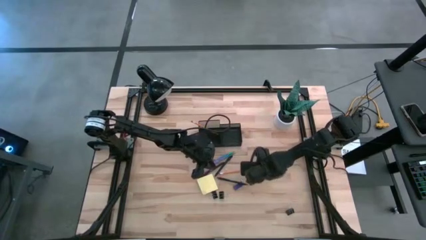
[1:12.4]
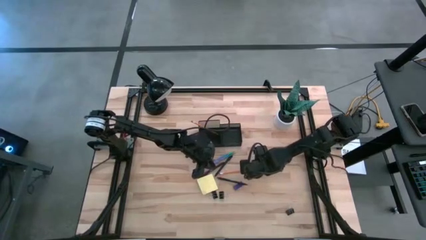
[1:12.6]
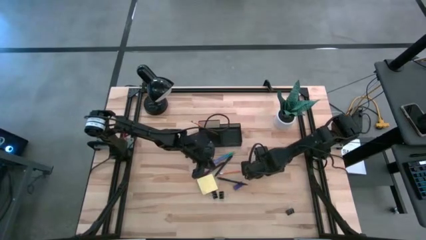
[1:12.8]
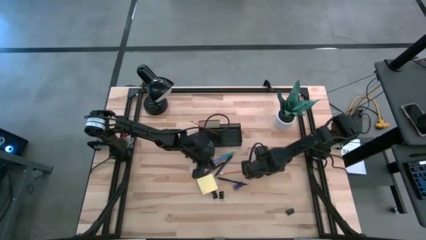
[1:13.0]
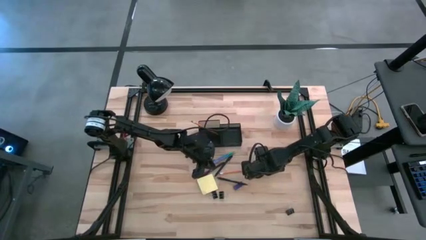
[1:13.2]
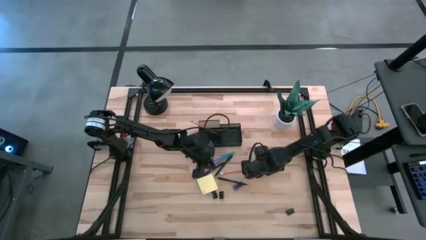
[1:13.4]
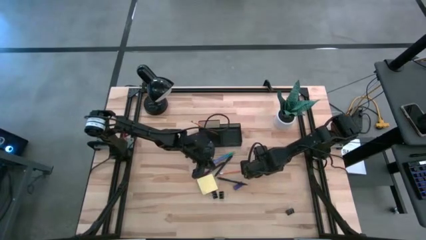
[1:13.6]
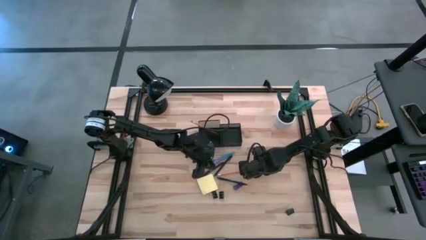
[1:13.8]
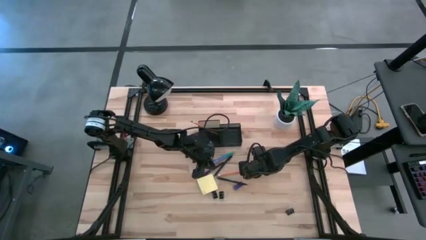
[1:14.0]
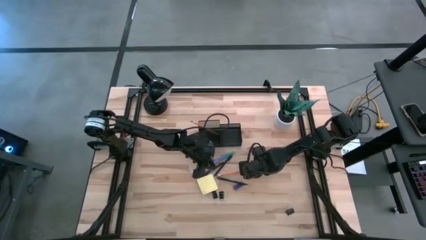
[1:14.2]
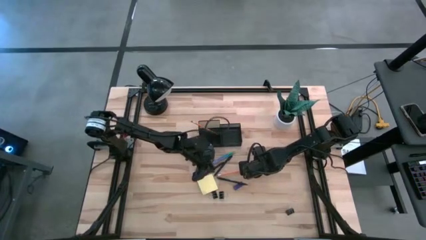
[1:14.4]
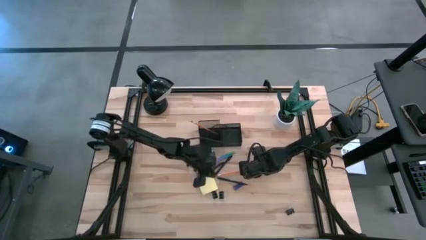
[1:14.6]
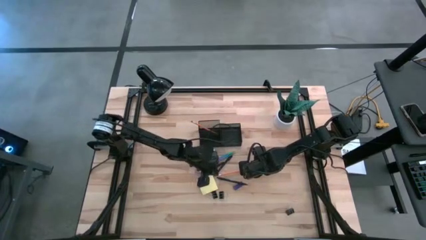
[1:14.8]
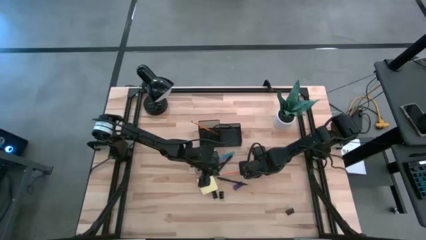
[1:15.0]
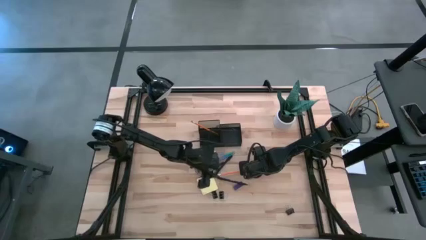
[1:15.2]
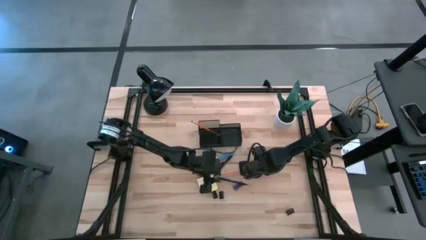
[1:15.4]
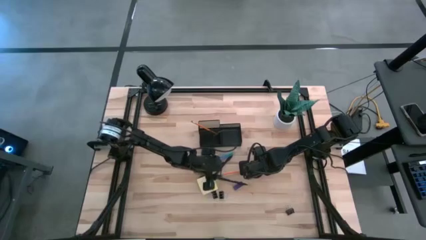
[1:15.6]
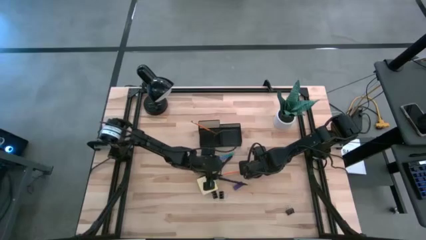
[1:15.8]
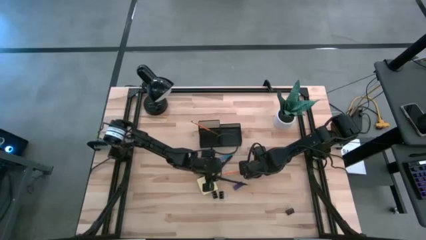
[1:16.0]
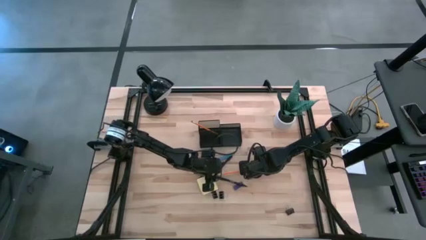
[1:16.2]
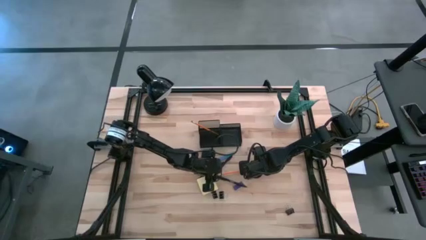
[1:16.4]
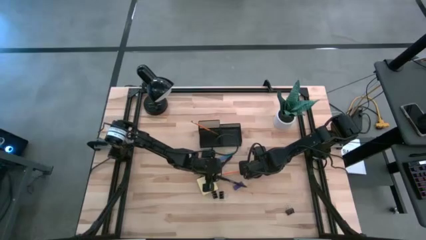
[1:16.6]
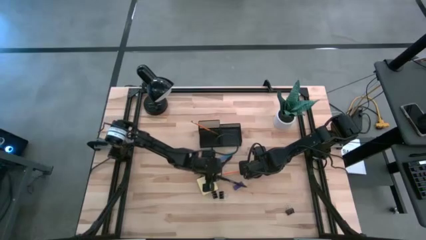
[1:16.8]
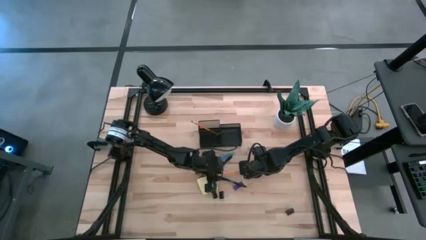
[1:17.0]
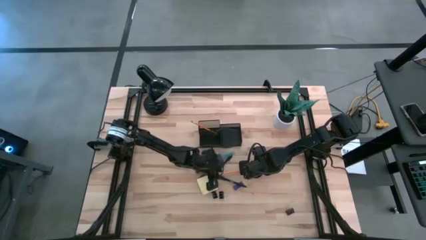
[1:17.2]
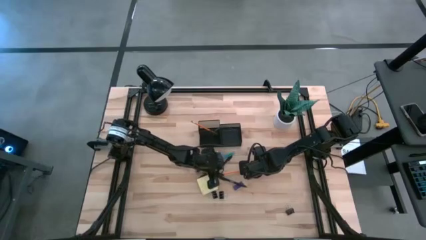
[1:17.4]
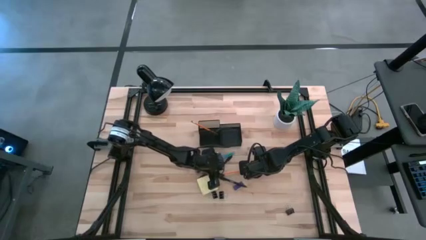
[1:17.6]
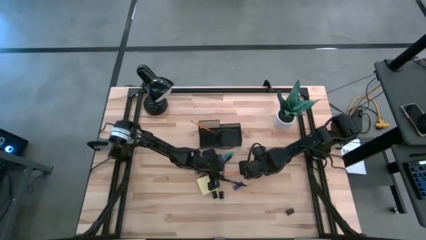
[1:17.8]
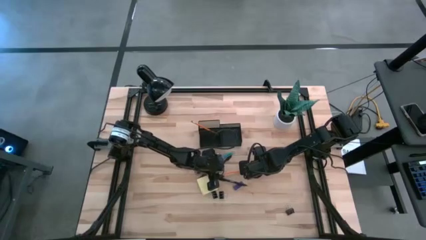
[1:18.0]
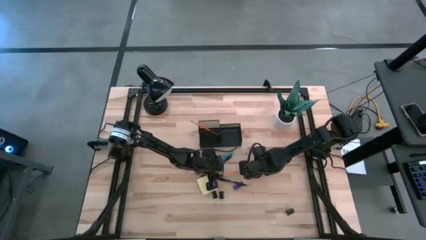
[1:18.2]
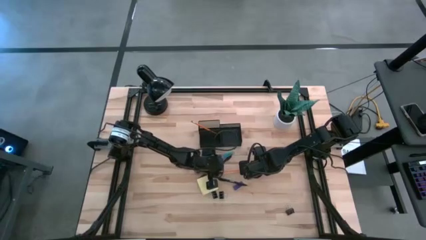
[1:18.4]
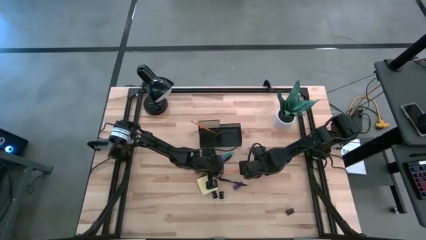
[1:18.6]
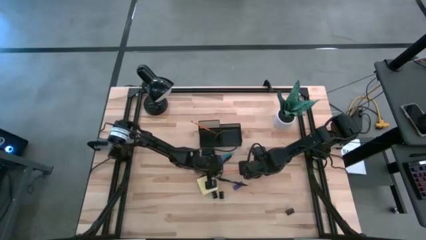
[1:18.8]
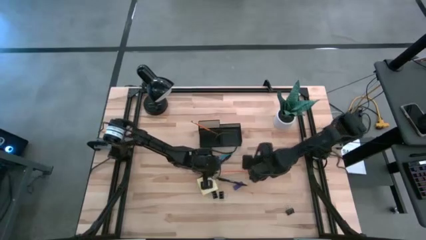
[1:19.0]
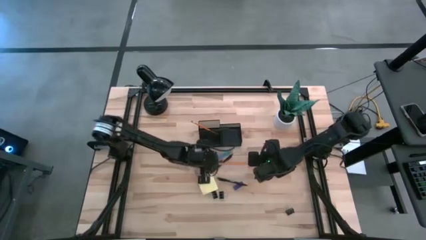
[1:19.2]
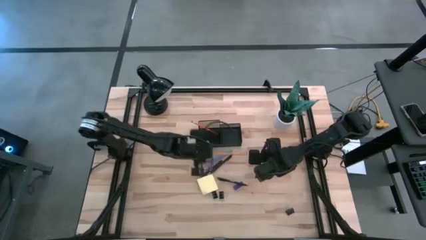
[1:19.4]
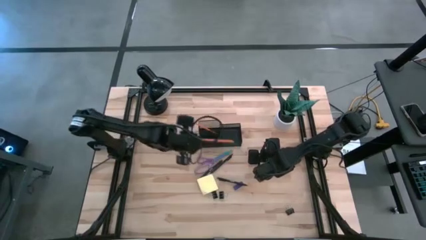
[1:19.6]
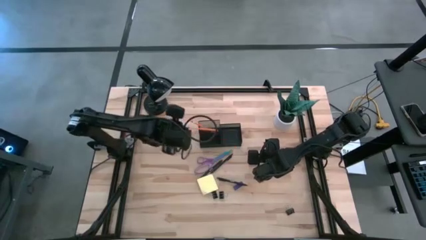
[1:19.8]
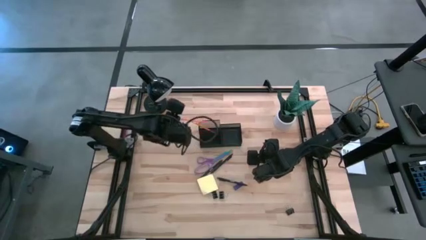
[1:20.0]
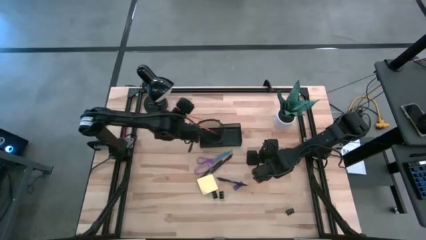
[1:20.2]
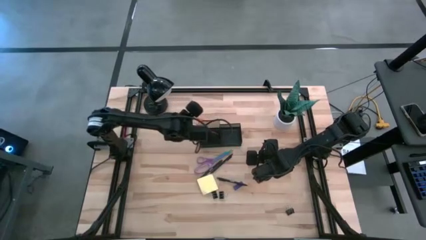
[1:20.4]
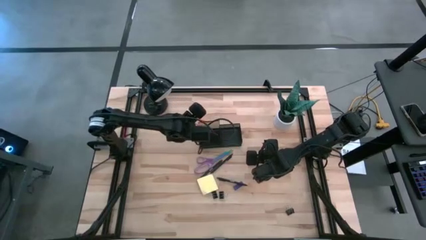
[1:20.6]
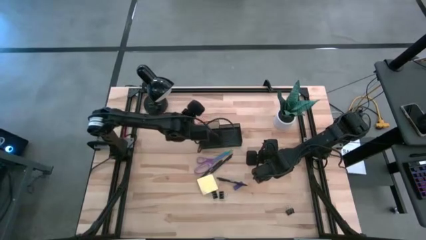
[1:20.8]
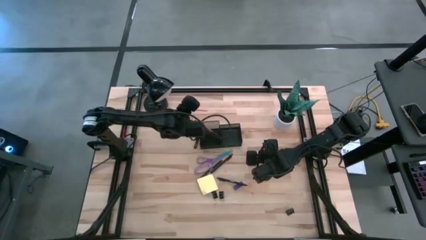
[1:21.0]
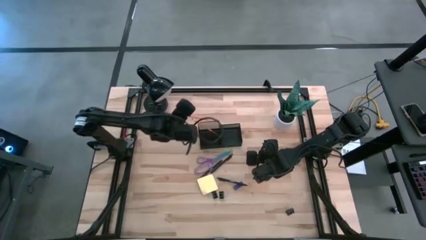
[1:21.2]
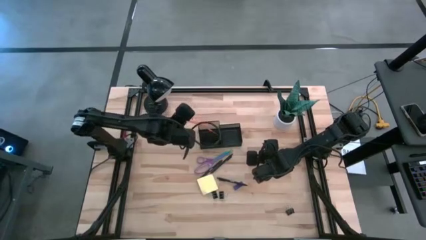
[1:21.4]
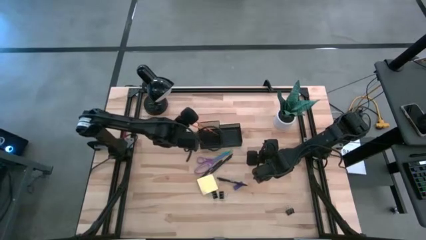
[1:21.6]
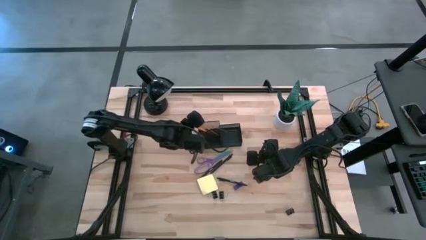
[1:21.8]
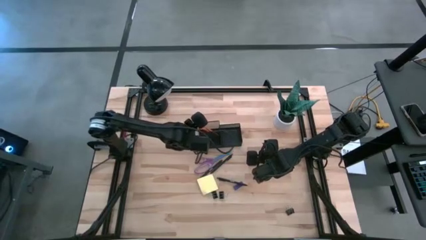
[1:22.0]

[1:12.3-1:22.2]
Task: Pick and place office supplies into organizer
Put the orange pencil into the black desk organizer

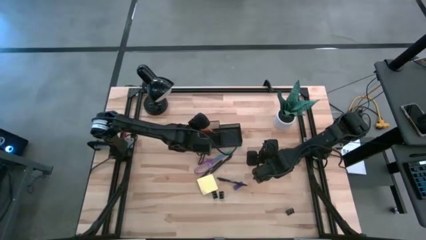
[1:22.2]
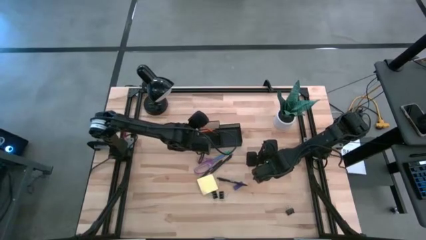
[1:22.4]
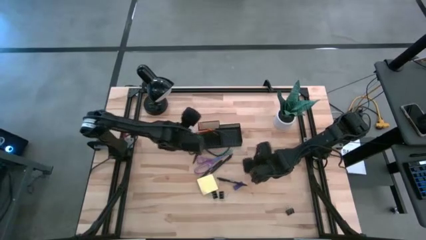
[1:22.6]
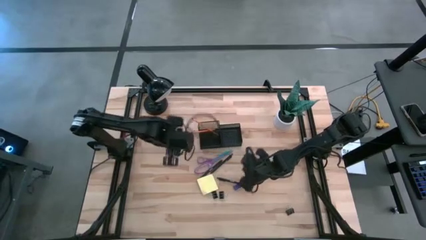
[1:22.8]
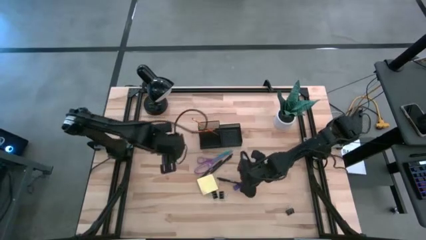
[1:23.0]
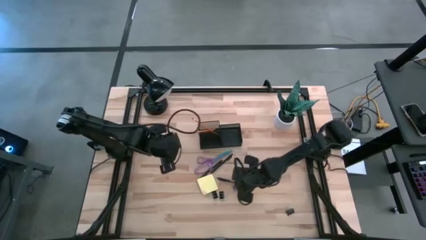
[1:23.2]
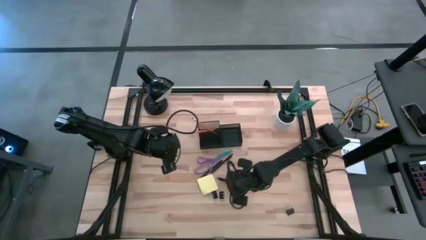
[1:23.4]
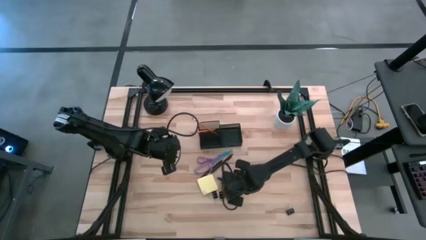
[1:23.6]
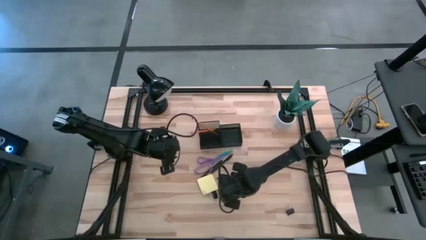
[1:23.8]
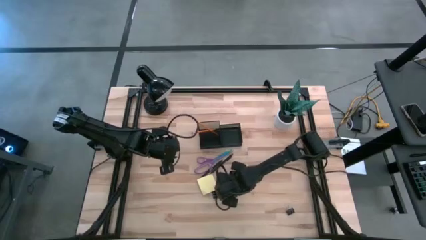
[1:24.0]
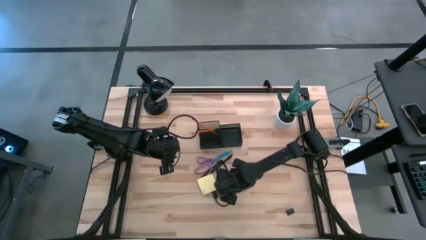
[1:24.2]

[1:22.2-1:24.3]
Put the bottom black pen into the black desk organizer

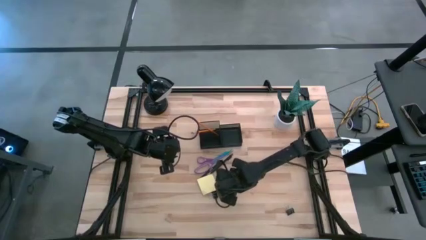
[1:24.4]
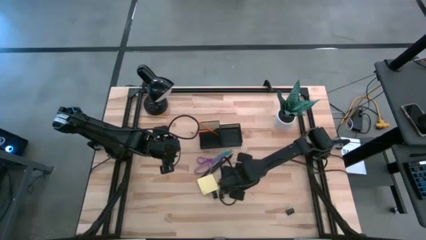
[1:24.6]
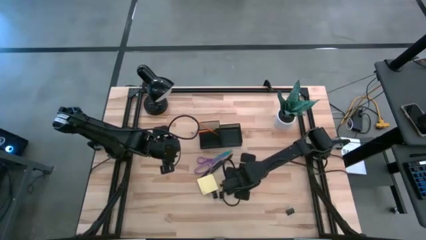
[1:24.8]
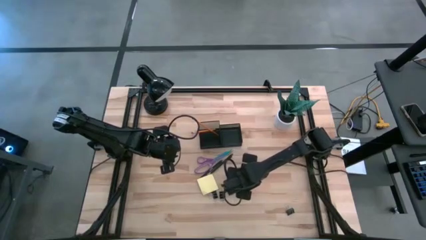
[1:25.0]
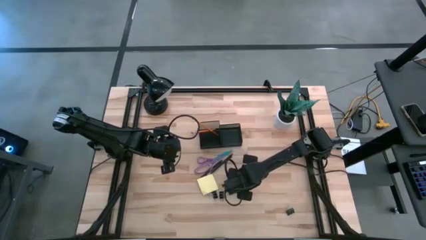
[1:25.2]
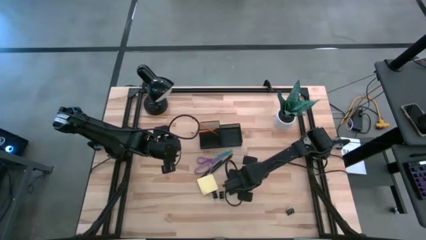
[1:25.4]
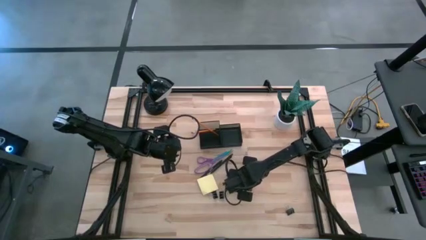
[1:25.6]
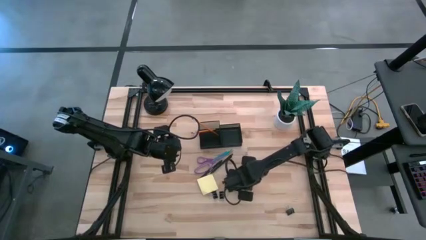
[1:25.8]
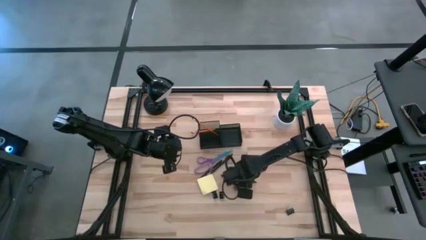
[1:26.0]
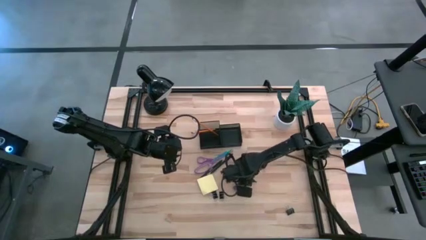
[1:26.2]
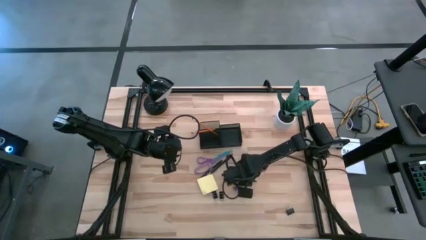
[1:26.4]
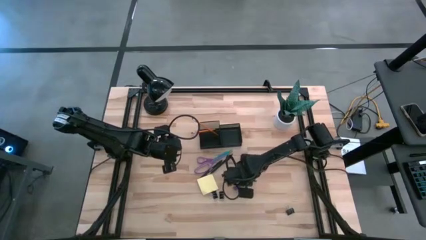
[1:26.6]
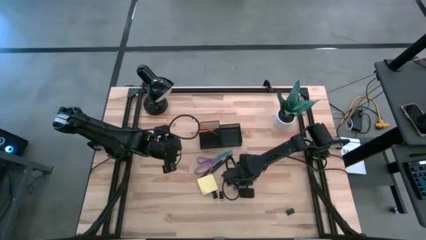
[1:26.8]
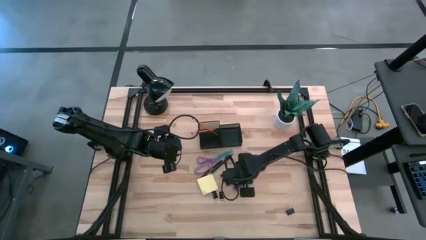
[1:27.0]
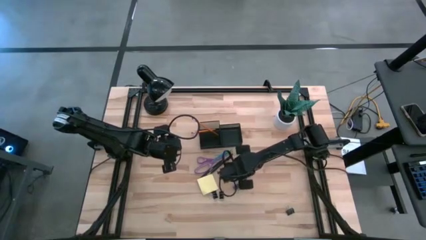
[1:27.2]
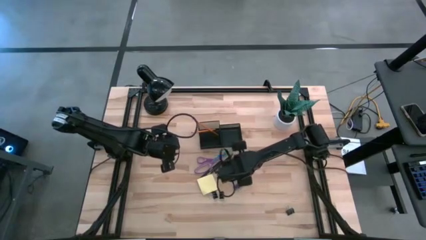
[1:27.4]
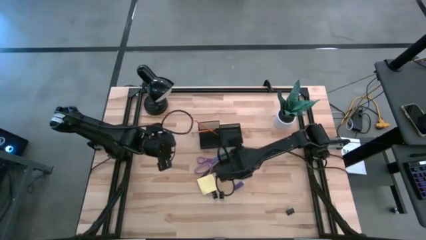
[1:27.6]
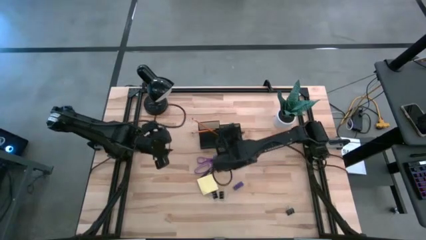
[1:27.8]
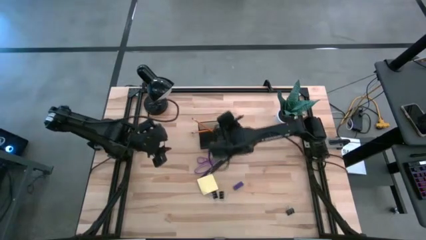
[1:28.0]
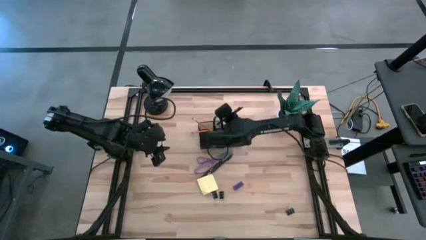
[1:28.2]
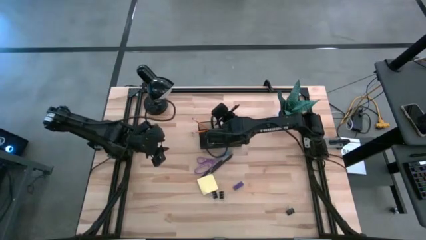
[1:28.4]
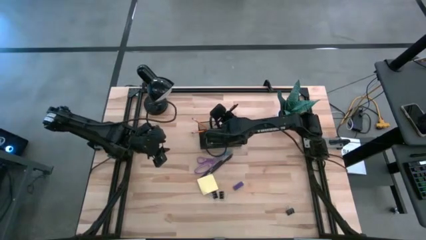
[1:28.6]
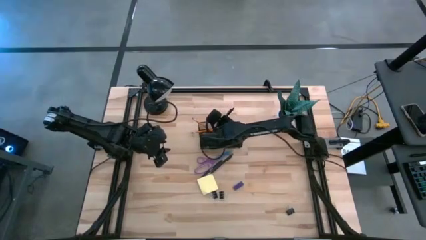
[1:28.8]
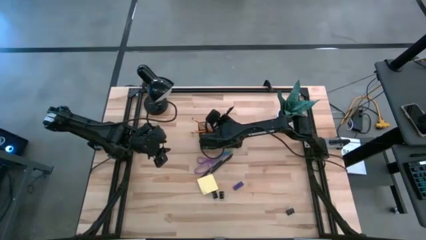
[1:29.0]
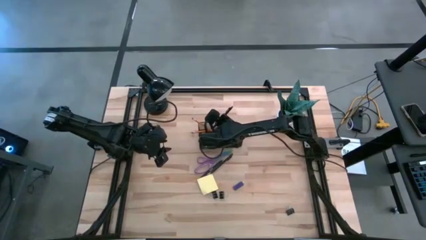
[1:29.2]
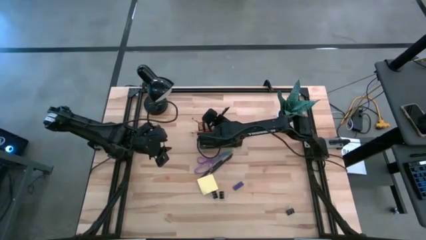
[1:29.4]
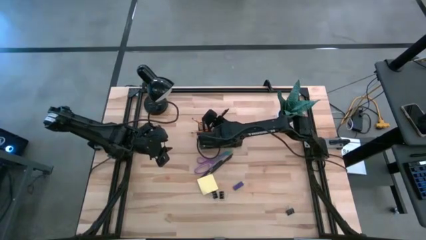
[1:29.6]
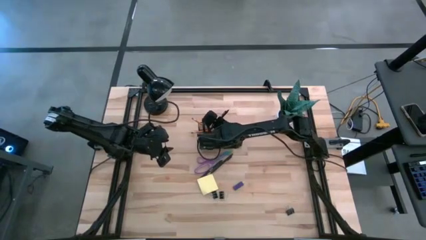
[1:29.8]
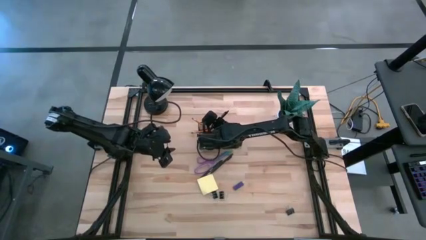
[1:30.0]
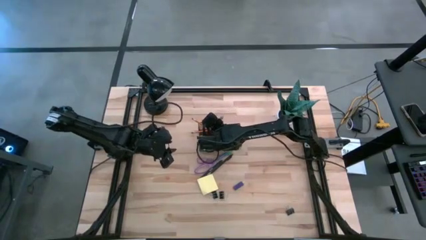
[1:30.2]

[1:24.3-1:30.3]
Put the bottom black pen into the black desk organizer
